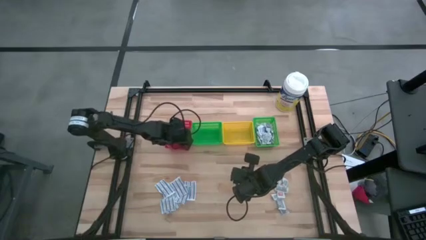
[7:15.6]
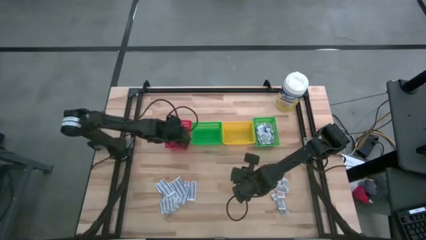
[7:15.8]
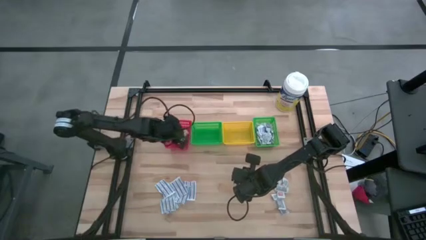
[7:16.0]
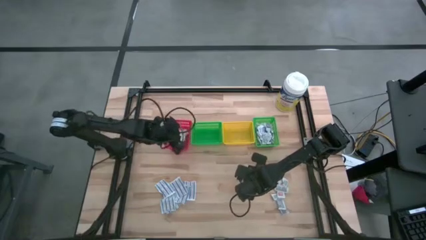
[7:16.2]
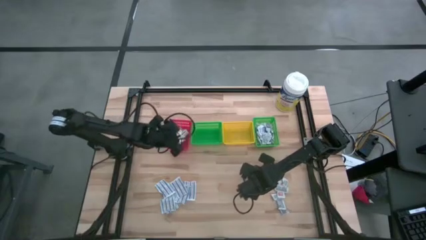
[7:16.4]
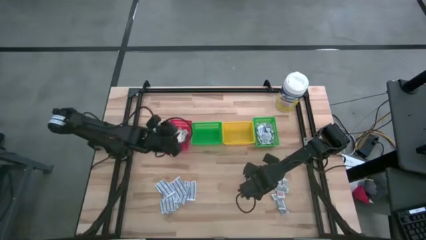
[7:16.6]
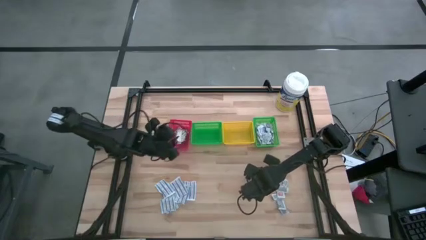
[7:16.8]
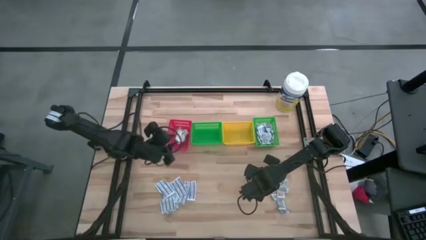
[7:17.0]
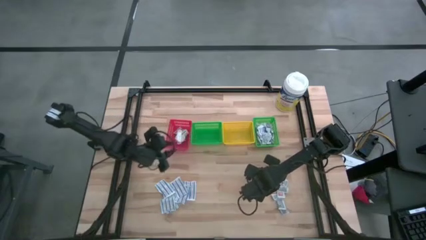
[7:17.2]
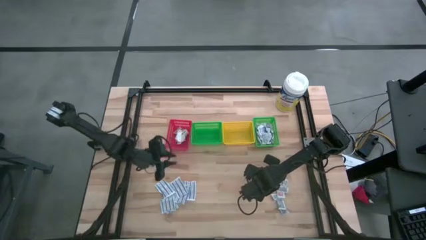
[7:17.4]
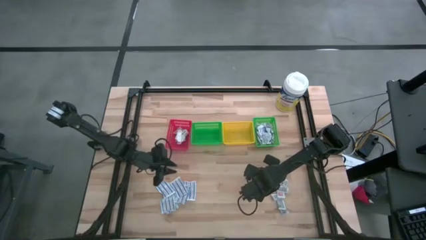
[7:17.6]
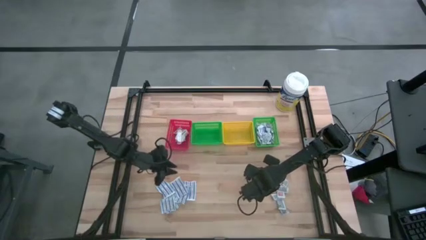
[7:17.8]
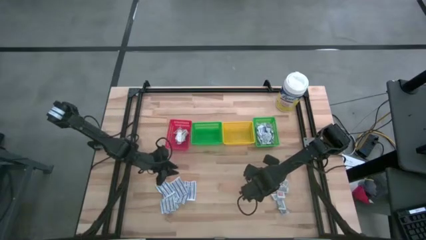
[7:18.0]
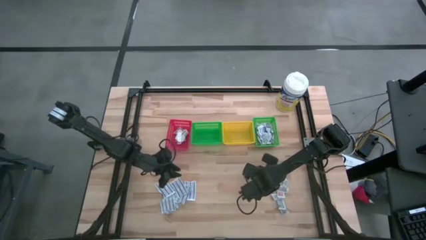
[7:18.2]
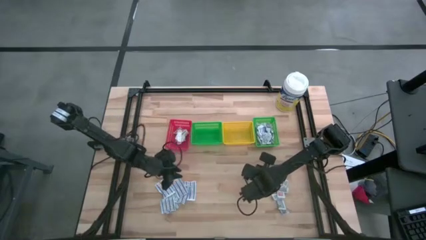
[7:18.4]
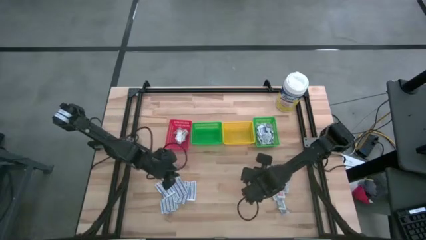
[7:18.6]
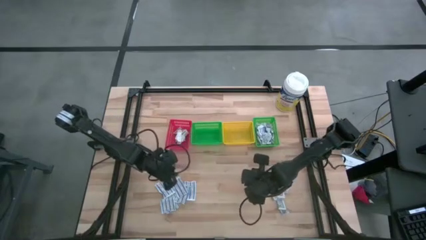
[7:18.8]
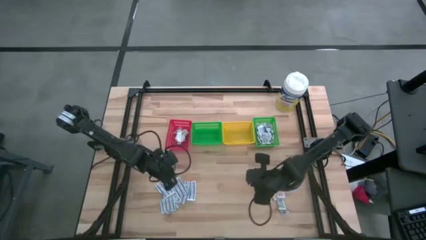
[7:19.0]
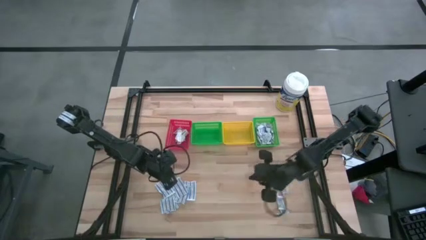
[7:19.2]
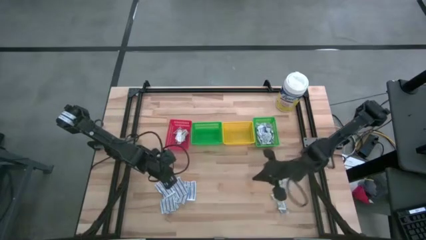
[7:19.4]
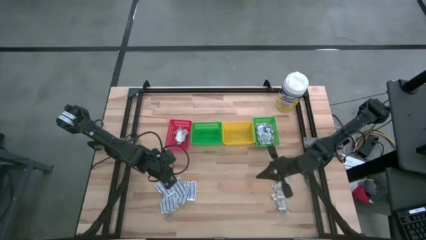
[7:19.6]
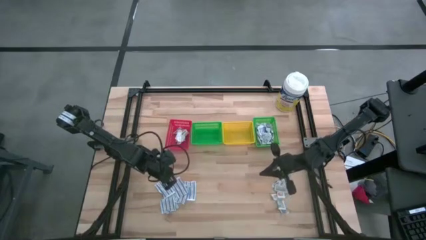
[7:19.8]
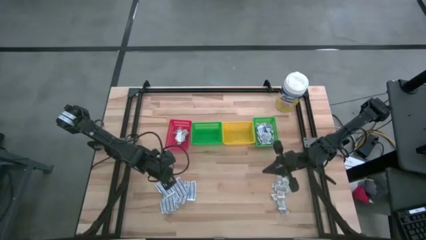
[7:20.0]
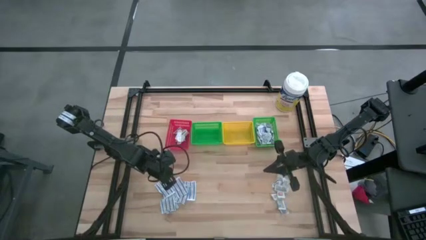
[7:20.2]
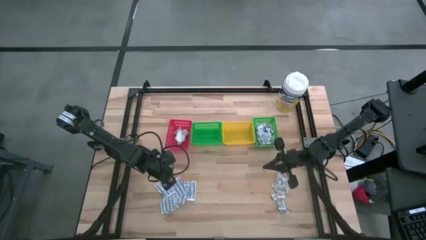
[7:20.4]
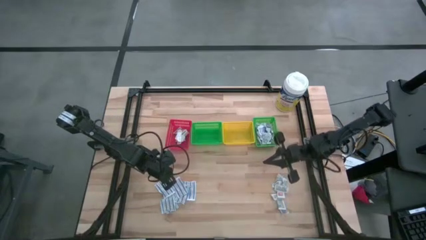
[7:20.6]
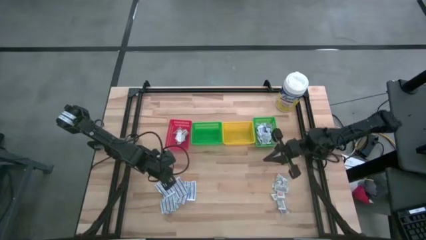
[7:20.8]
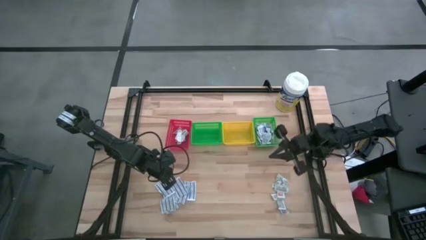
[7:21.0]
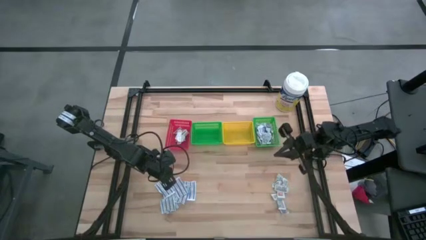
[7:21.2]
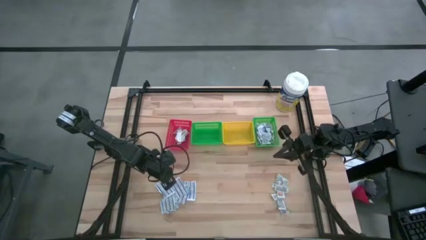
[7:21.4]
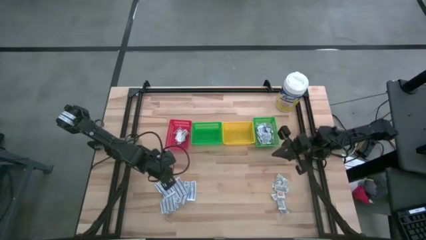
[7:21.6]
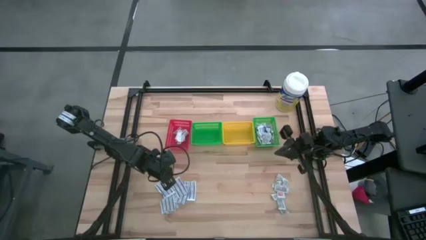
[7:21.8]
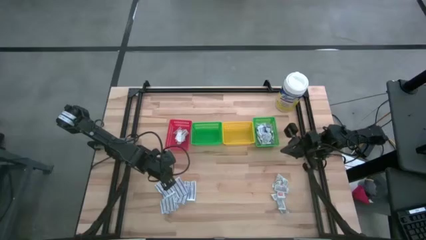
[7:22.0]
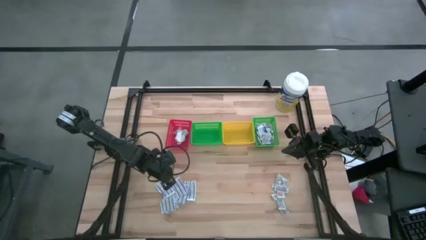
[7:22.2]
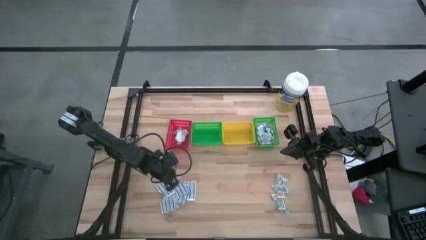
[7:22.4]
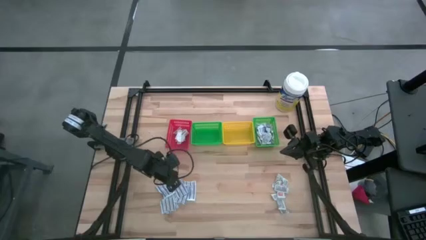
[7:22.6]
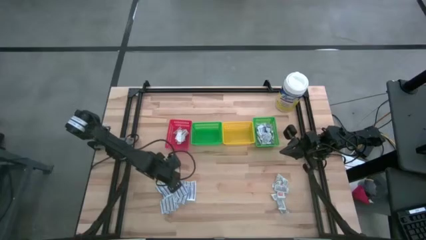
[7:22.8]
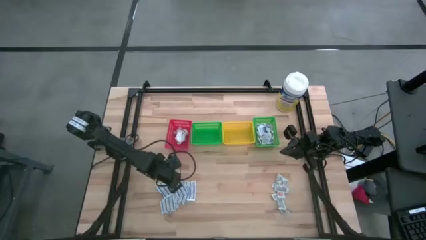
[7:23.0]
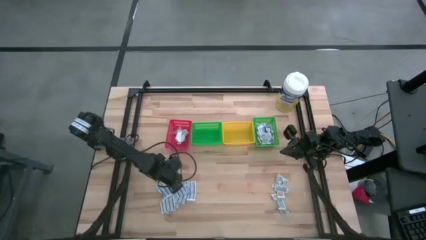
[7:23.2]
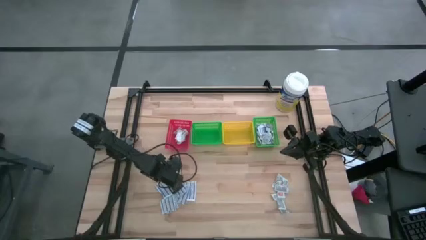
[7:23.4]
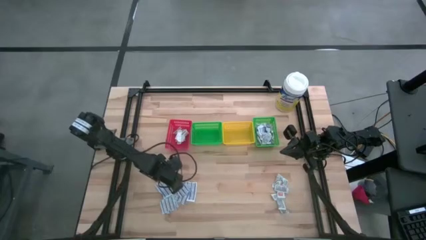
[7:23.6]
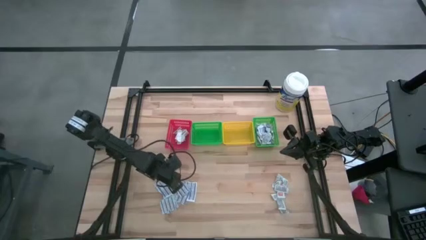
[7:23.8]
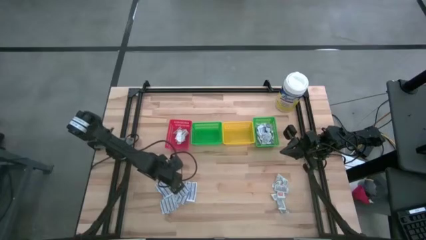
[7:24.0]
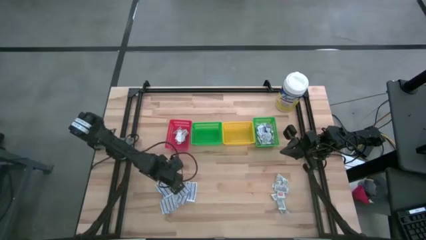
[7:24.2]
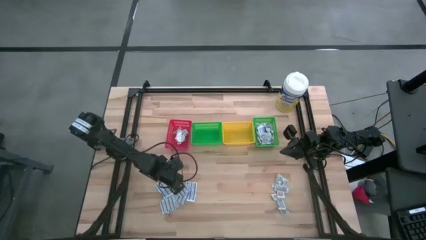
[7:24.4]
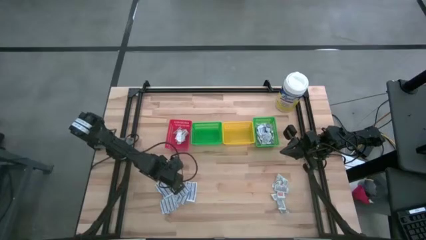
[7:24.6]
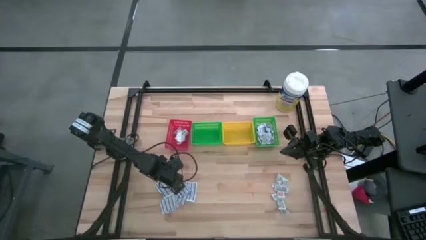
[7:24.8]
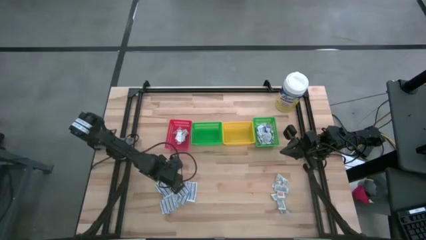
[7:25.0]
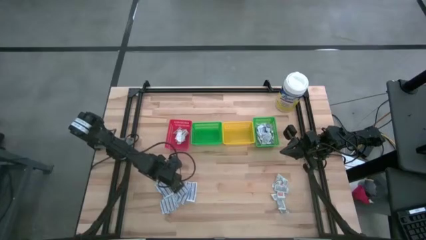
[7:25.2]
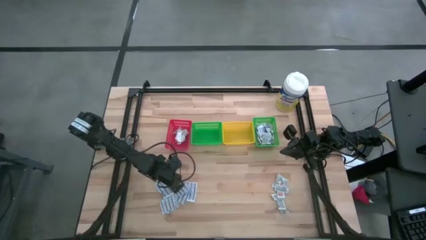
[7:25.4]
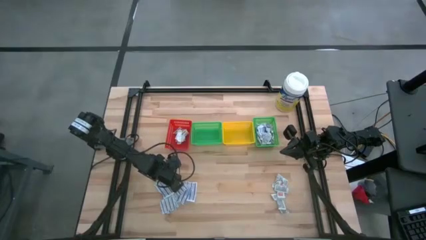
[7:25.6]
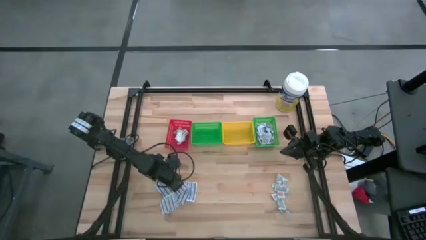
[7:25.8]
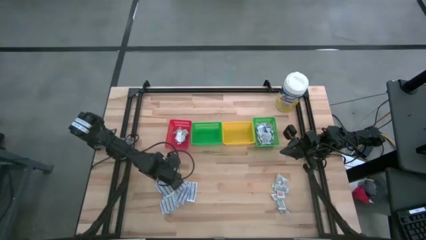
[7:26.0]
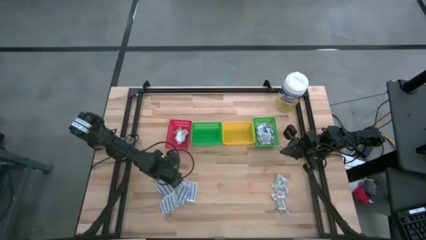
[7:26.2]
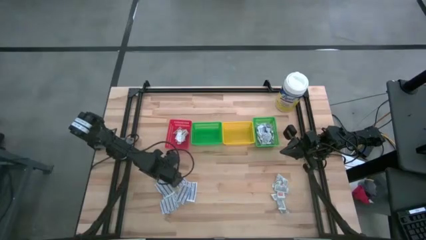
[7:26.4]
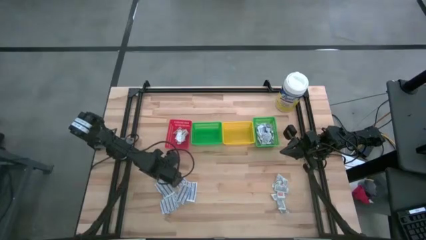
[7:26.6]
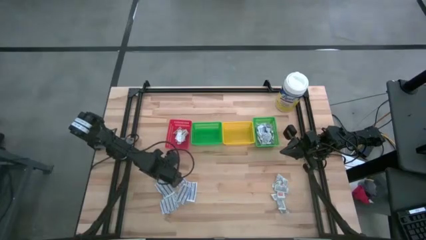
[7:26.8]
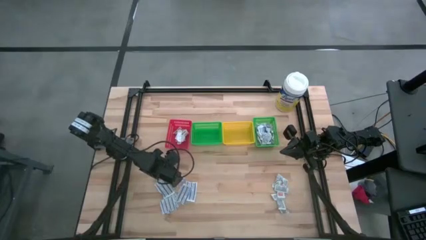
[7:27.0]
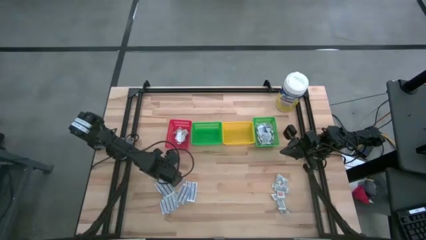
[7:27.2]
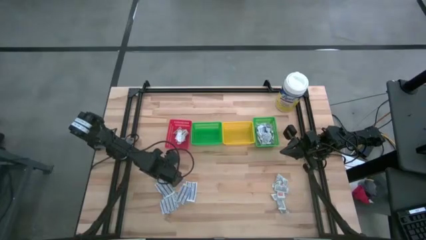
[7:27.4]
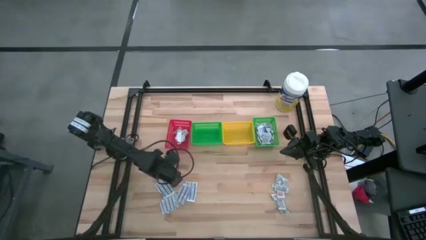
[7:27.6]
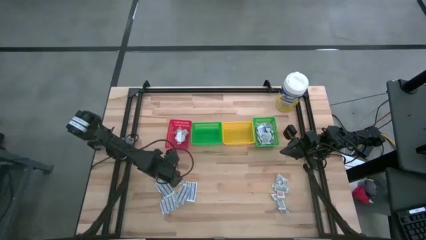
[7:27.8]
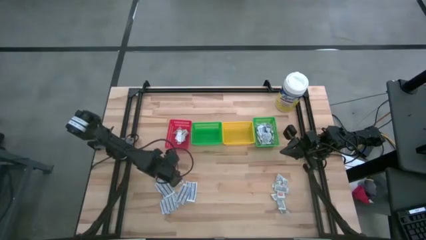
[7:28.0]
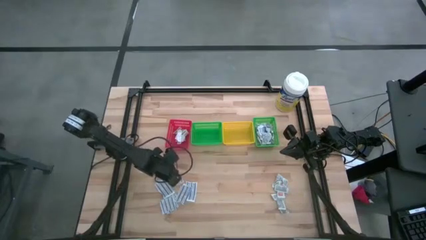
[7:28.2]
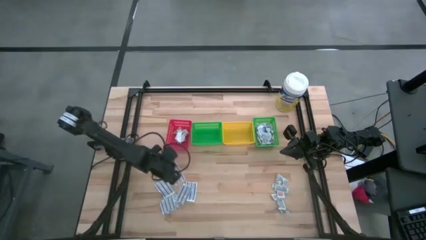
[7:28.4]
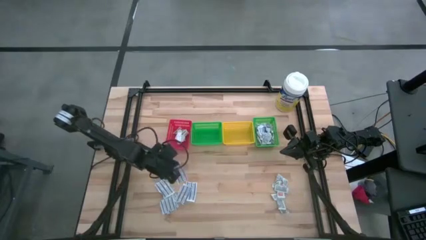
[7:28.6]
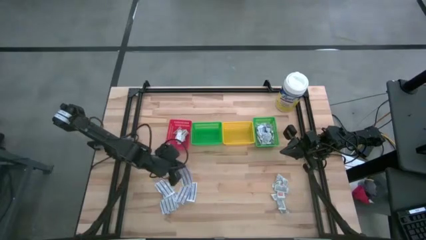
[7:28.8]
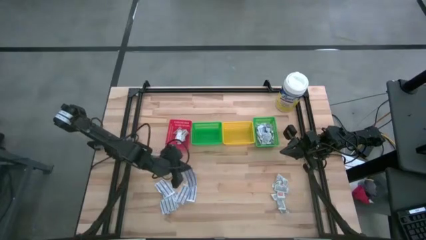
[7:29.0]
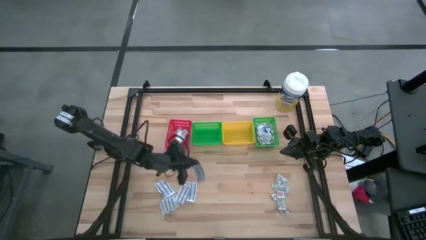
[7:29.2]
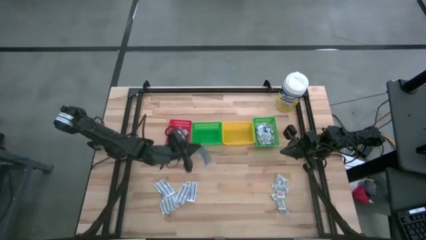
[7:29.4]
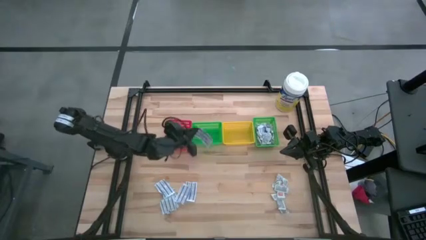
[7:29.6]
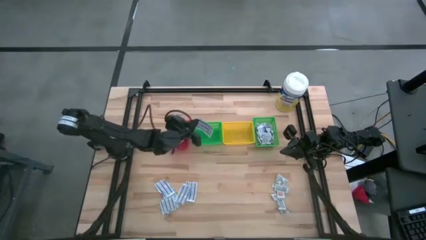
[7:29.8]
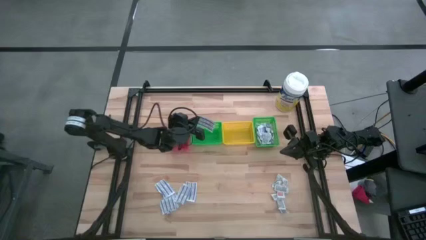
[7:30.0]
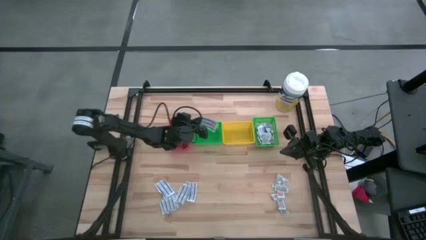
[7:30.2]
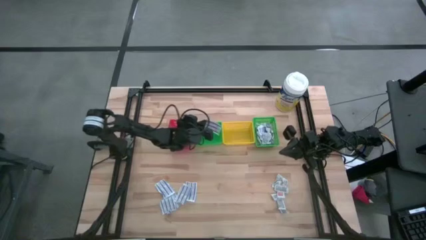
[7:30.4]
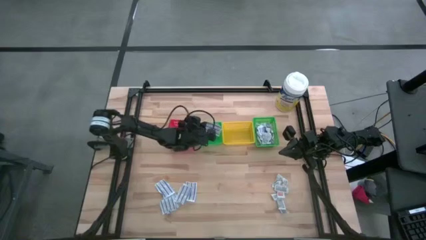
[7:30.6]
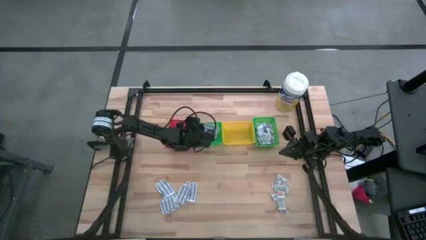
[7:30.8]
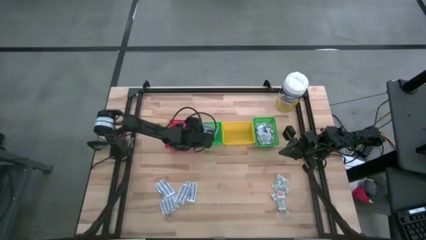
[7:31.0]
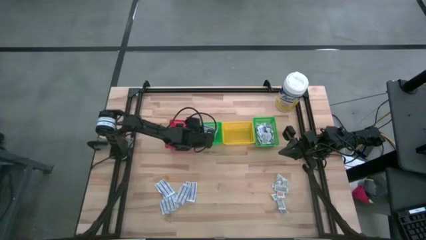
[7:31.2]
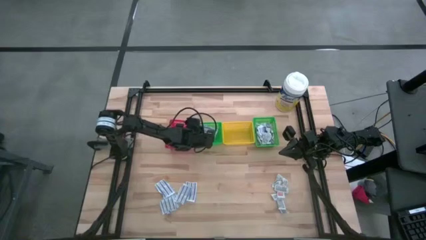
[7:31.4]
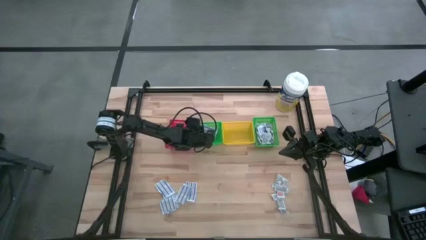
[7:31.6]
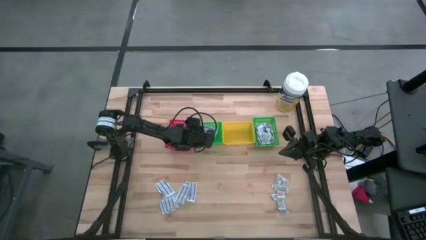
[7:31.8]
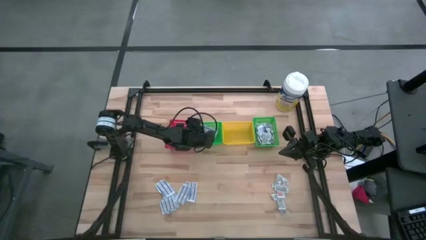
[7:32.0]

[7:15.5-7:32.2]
Task: Pick & Place First Aid Supplies
Put the blue bandage into the left green bin
